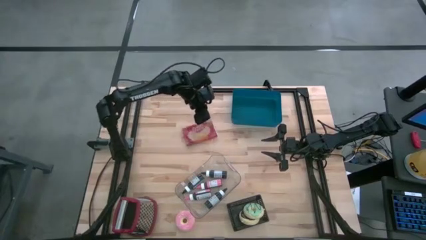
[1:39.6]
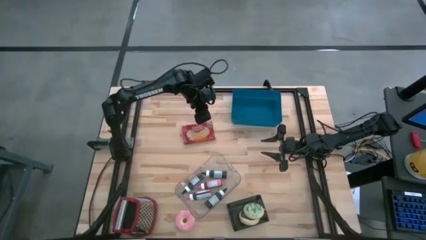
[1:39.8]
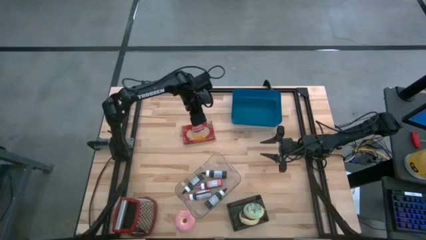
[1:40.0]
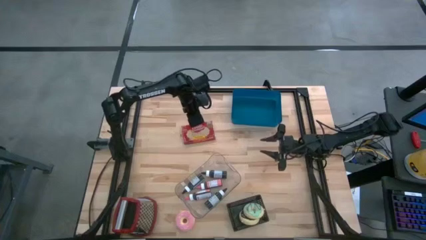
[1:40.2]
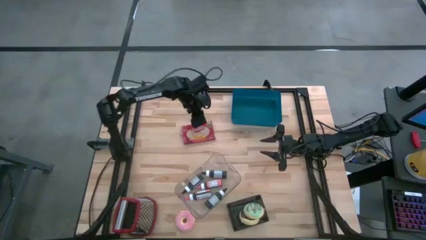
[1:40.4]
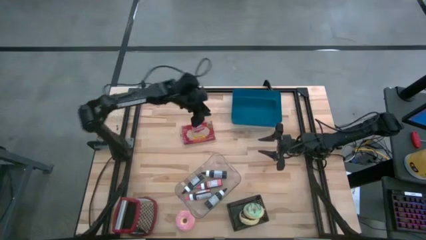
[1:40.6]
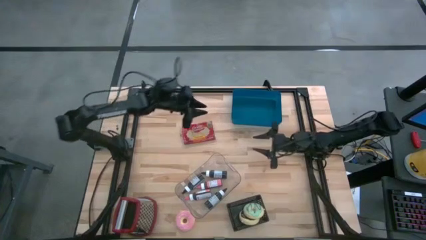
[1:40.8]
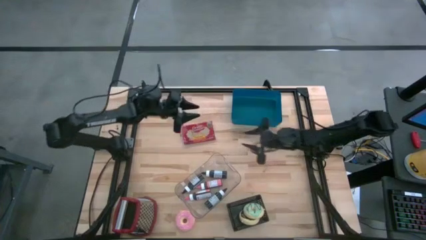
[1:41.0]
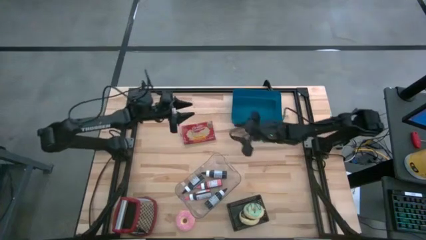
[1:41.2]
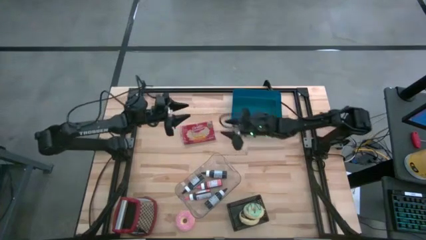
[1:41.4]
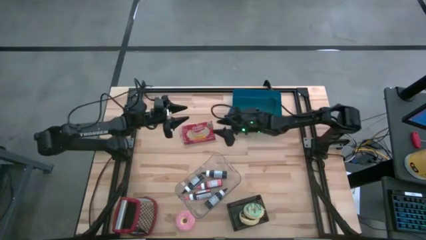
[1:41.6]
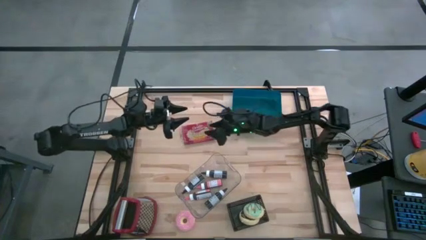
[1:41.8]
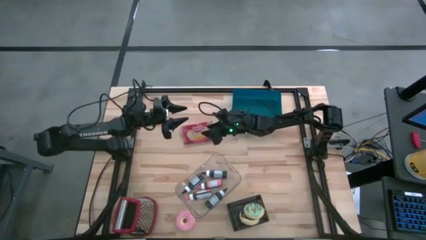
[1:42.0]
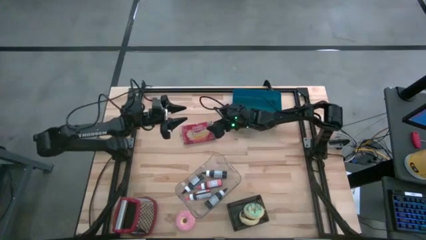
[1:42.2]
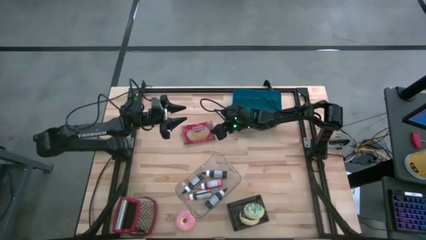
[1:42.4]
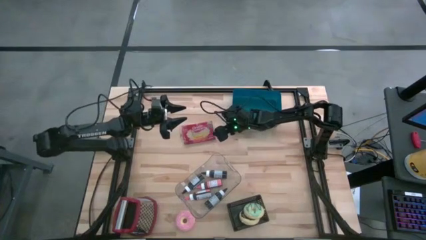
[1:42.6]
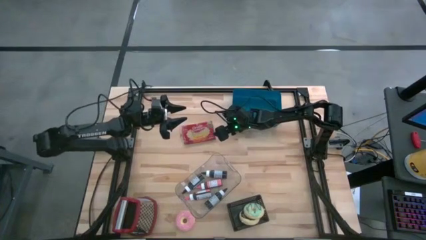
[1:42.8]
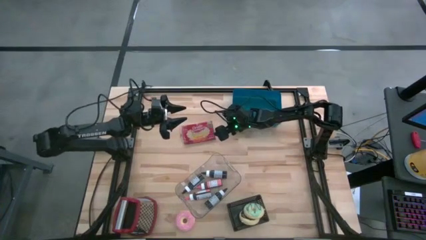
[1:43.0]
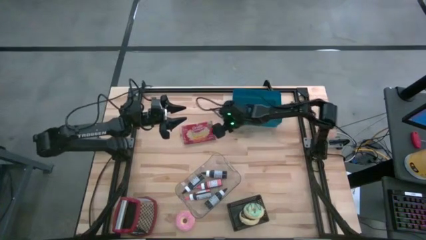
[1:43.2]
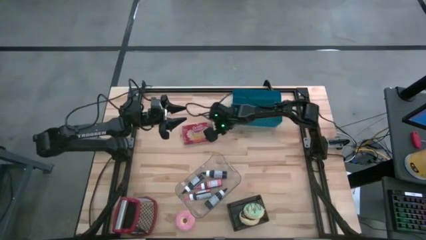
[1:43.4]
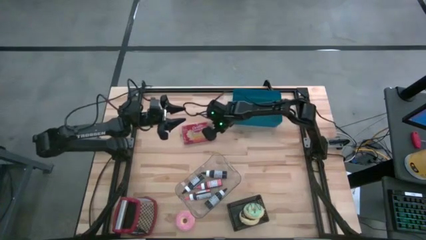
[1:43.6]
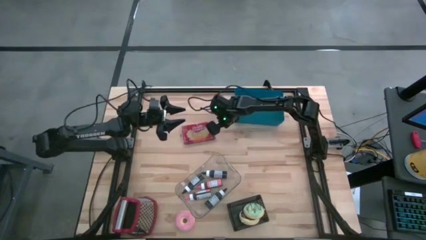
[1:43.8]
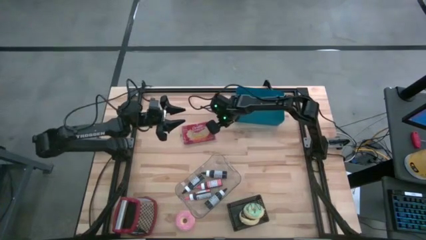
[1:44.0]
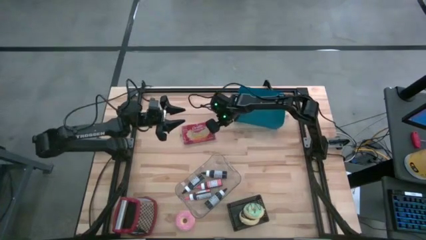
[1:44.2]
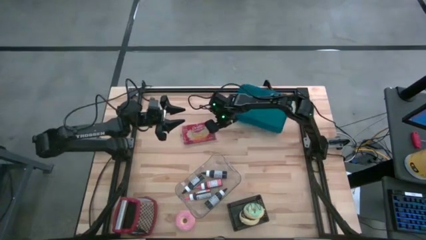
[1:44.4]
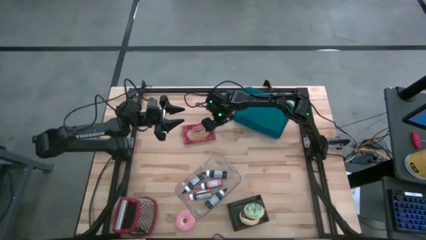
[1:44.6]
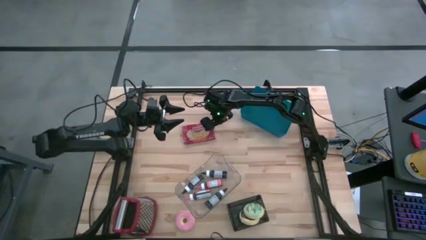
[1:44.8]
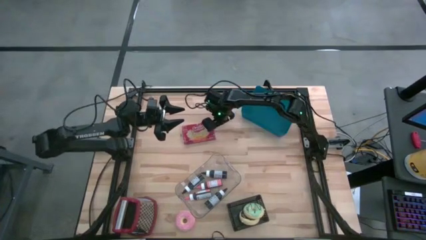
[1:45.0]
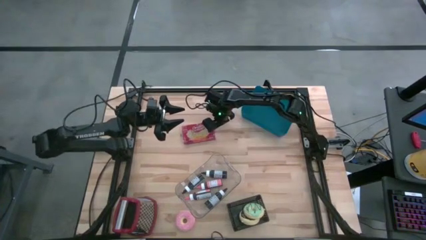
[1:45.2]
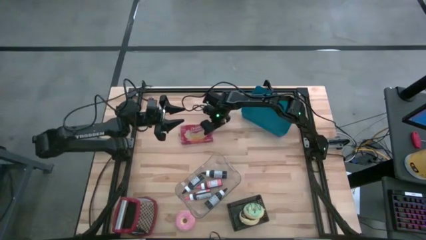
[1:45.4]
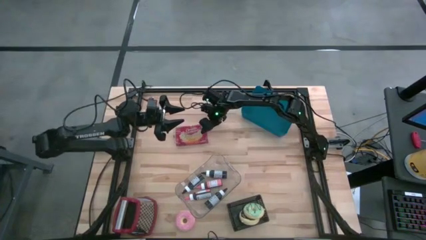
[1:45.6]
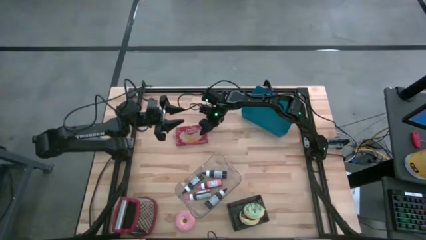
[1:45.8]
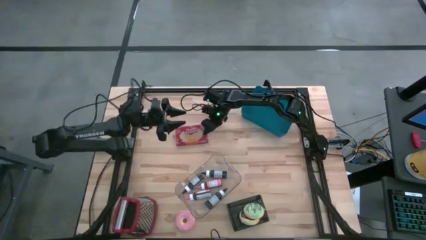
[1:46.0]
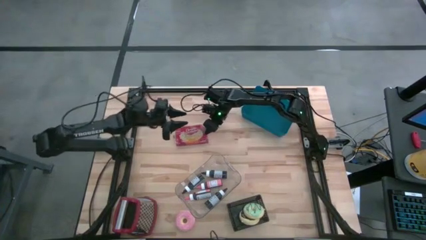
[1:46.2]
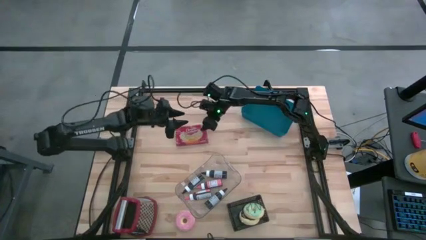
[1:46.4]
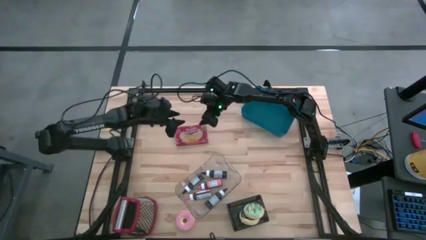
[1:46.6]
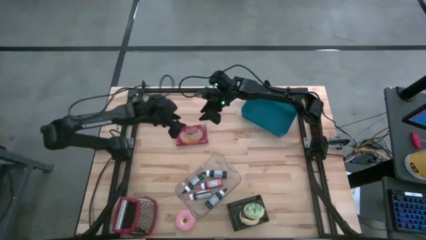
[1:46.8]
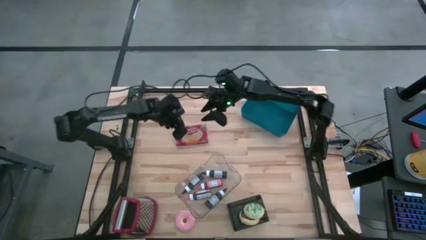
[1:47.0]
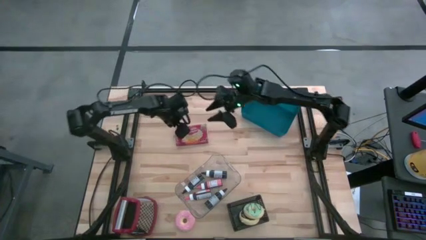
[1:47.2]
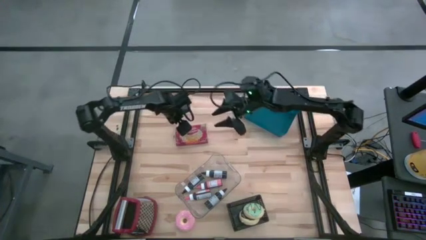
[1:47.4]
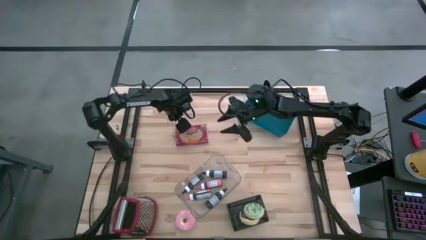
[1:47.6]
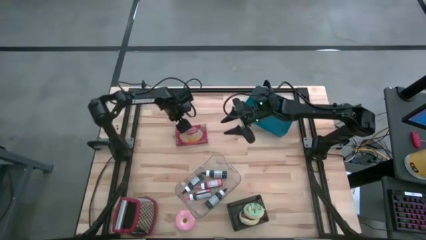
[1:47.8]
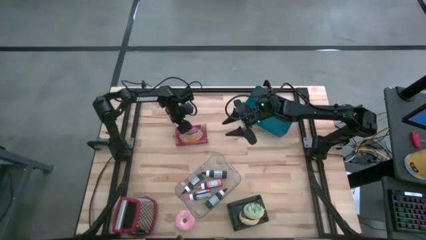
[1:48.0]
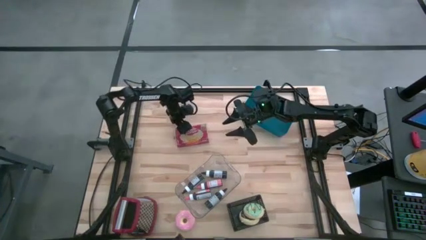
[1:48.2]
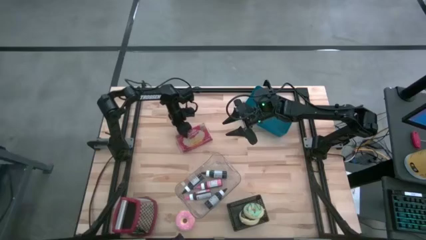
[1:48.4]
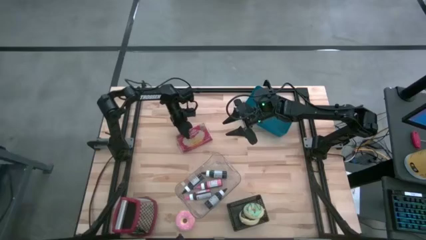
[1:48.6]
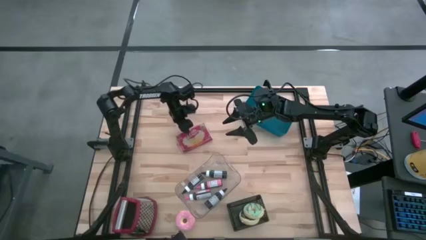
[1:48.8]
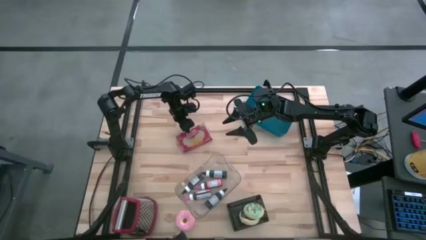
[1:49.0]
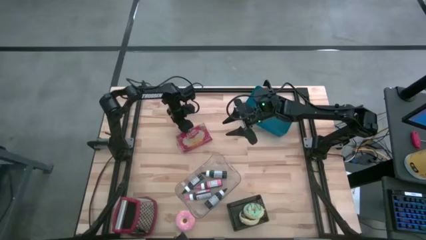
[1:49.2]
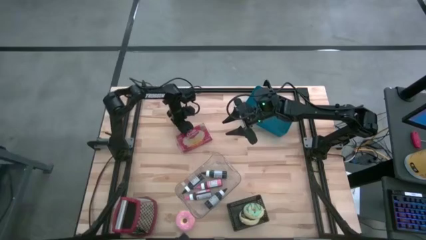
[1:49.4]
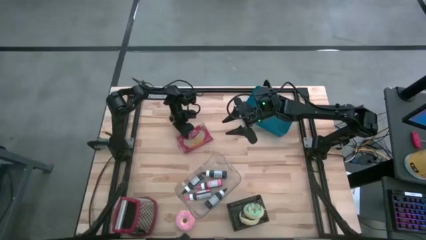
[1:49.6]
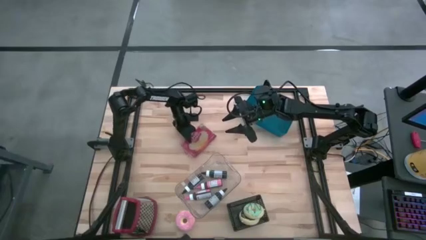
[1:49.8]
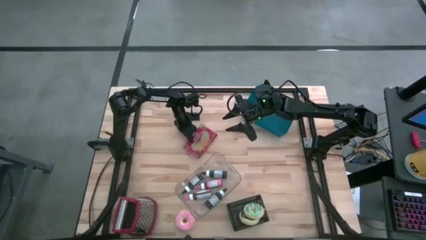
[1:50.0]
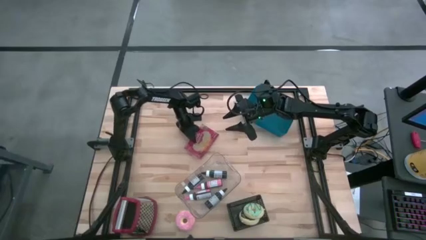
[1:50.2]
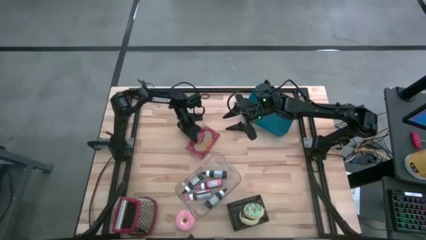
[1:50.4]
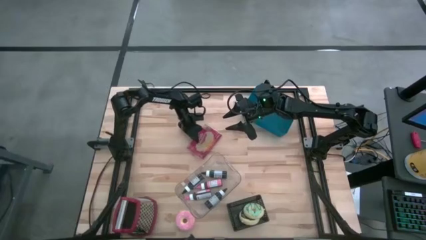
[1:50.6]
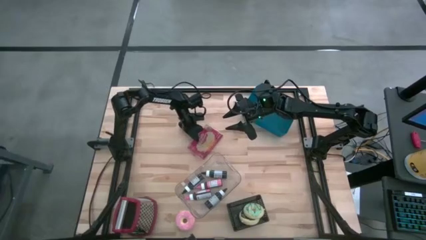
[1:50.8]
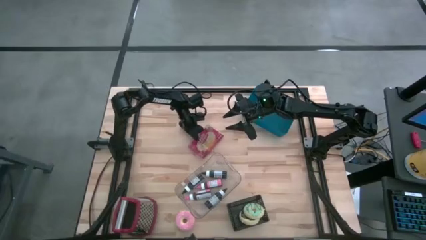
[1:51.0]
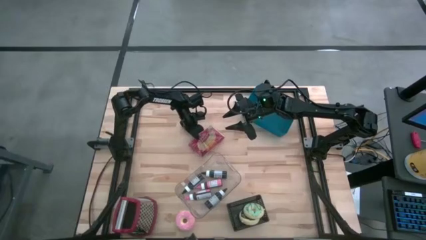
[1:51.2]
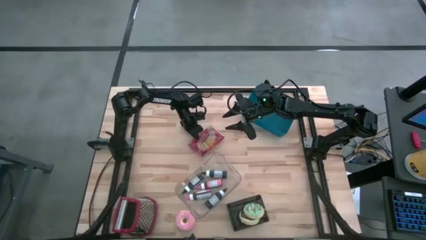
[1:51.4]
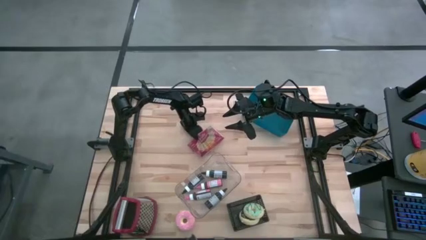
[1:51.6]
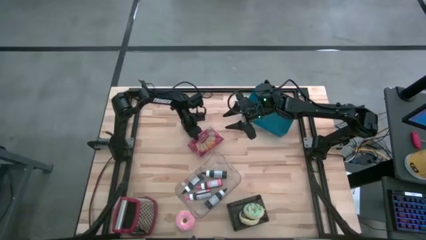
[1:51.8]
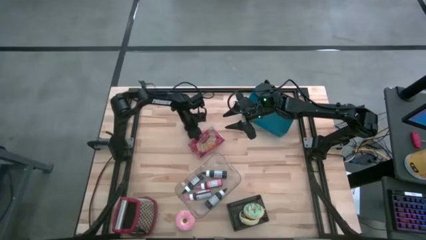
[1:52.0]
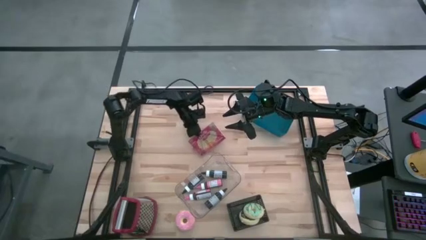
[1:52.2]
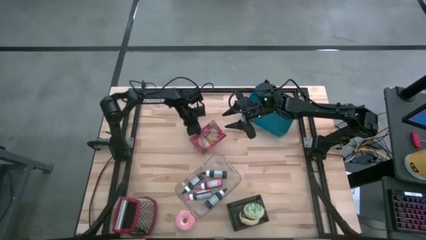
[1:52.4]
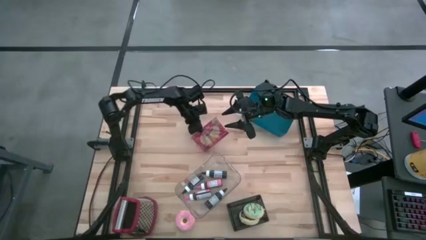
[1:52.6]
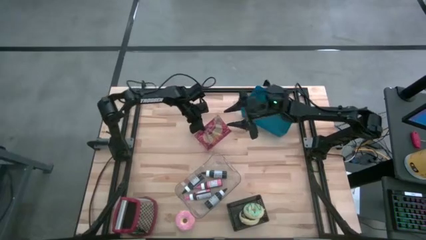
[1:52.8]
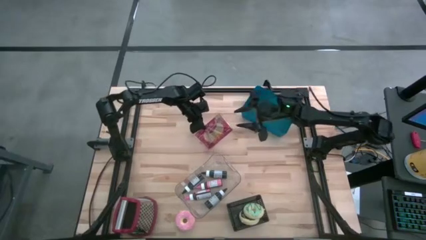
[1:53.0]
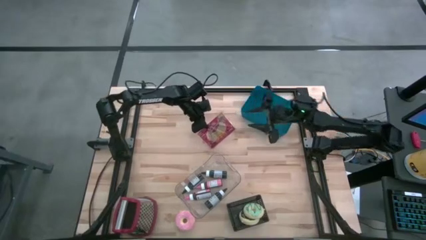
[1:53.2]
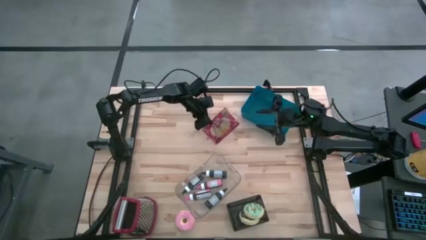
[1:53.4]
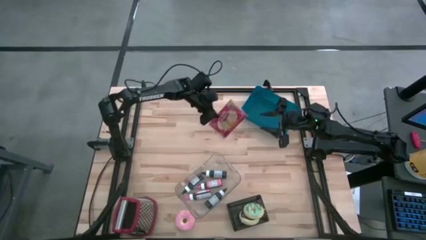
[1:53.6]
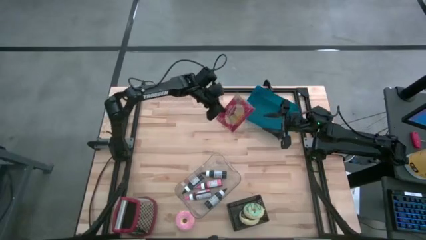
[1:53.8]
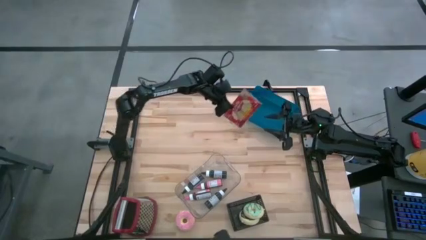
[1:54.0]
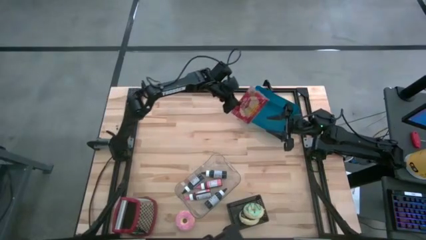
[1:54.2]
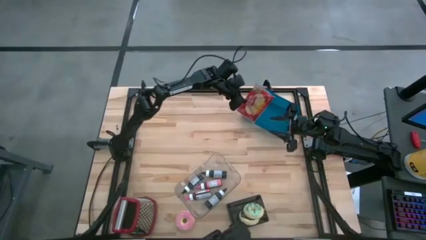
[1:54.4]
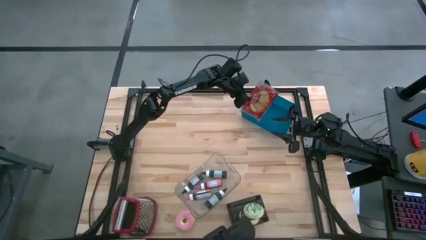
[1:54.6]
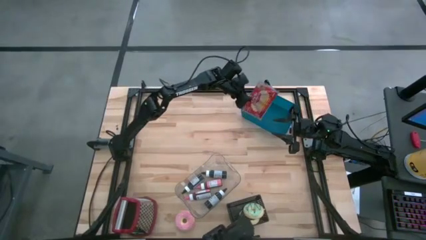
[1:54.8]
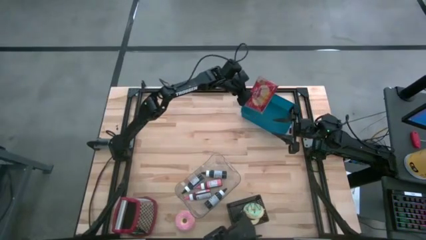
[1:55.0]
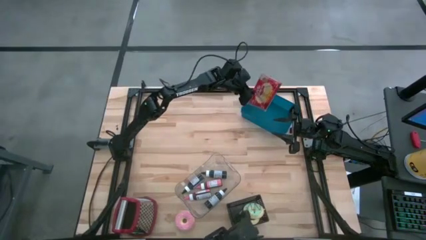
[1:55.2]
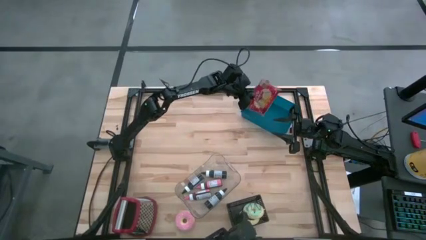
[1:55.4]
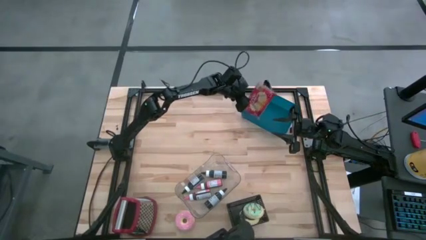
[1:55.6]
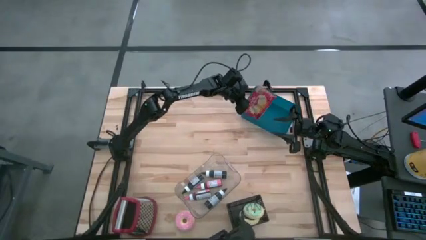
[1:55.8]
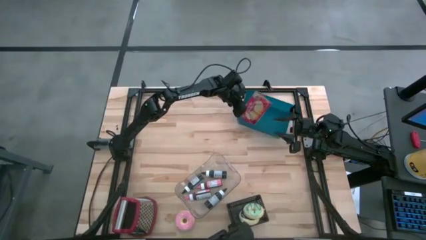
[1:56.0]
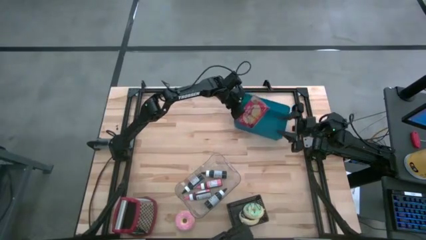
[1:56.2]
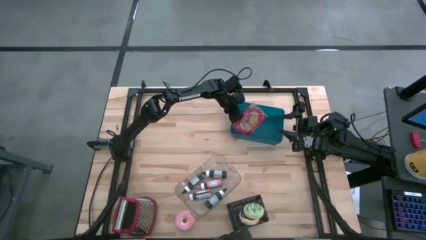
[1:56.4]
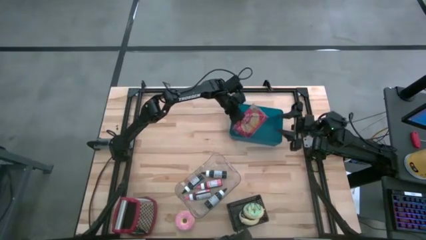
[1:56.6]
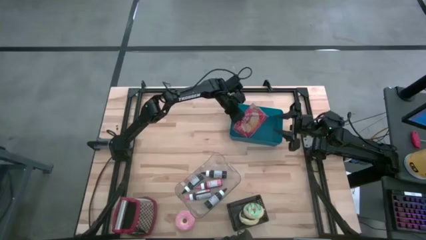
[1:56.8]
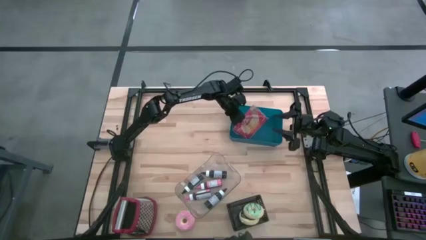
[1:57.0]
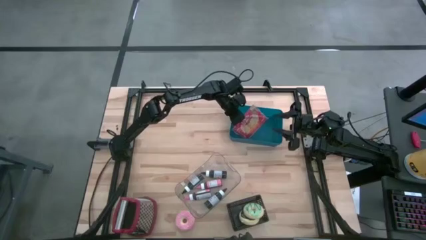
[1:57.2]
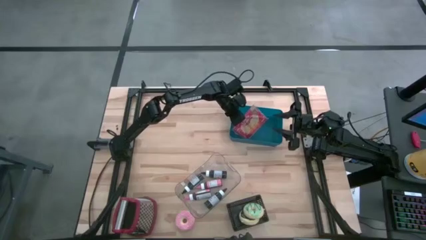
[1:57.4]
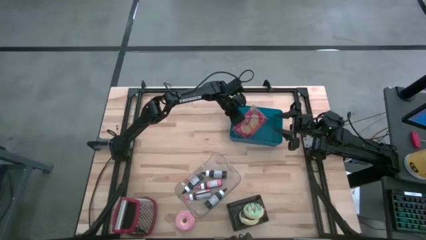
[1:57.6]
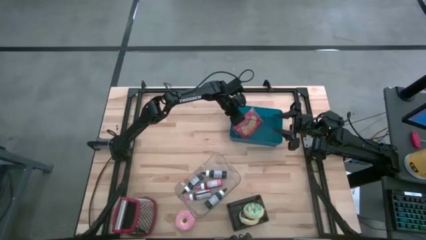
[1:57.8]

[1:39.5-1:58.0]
Put the popcorn bag into the blue bin
